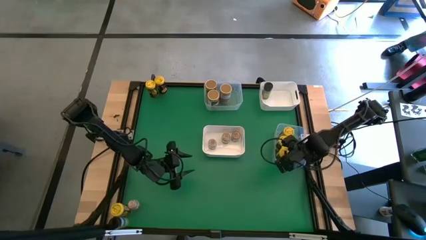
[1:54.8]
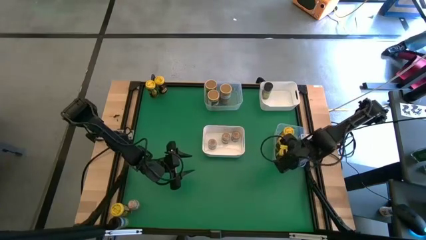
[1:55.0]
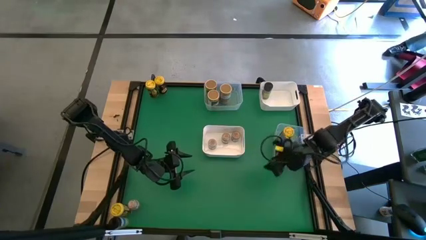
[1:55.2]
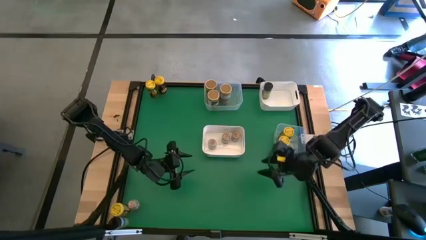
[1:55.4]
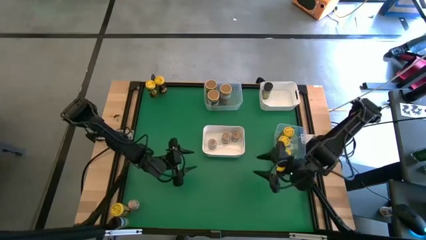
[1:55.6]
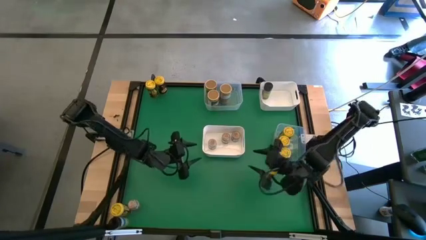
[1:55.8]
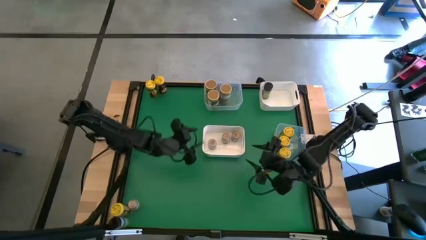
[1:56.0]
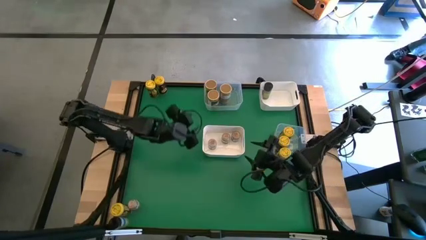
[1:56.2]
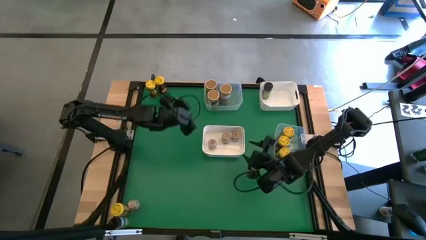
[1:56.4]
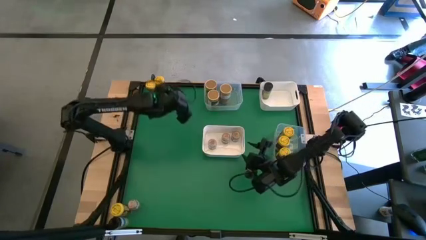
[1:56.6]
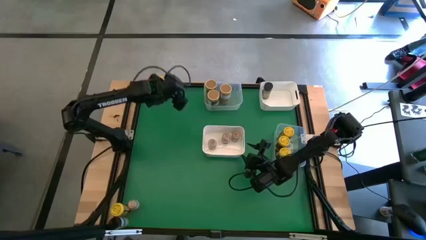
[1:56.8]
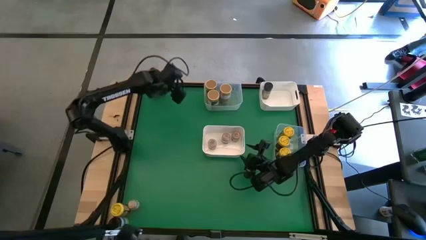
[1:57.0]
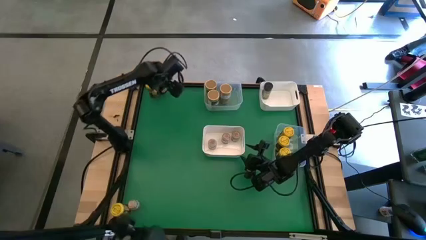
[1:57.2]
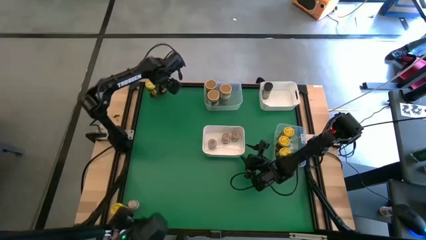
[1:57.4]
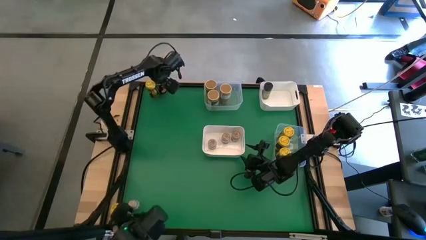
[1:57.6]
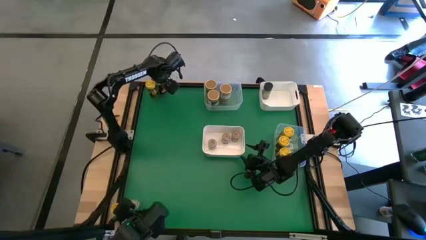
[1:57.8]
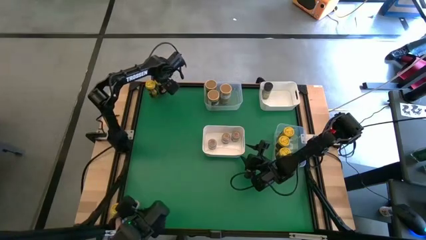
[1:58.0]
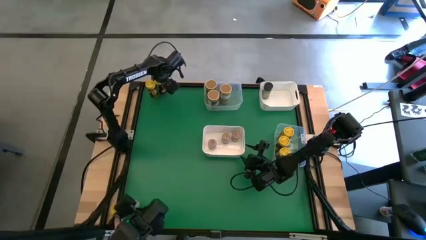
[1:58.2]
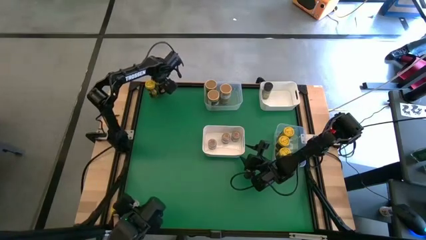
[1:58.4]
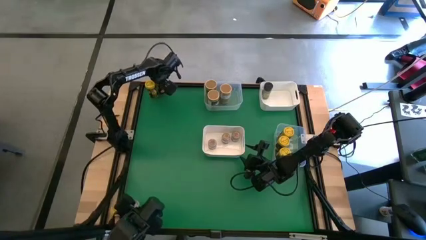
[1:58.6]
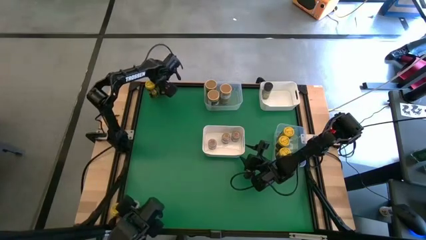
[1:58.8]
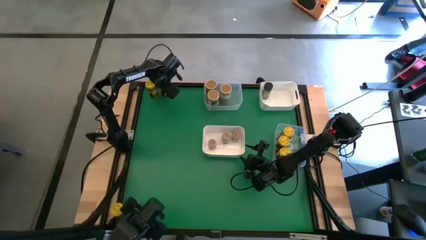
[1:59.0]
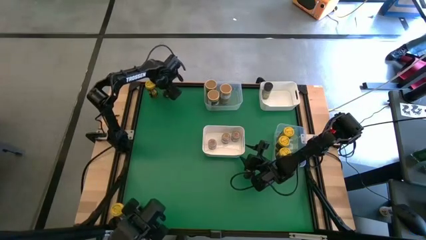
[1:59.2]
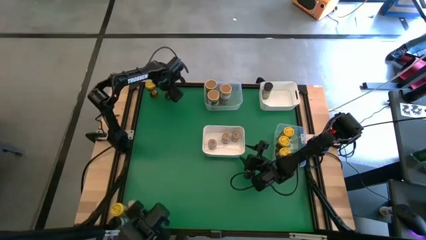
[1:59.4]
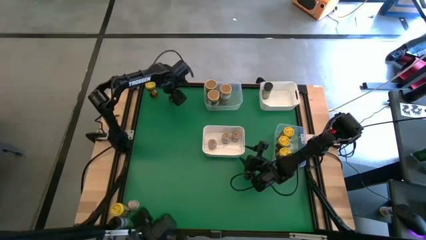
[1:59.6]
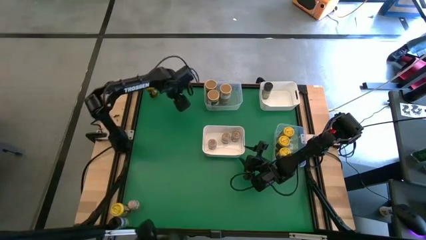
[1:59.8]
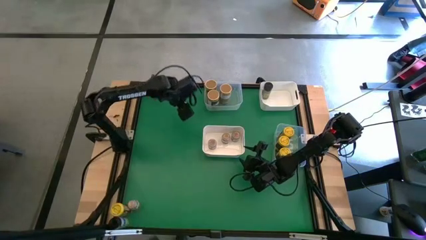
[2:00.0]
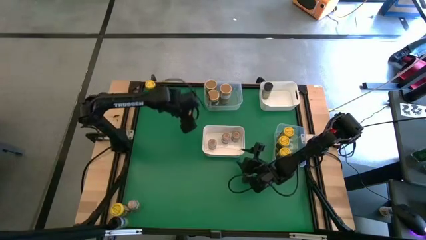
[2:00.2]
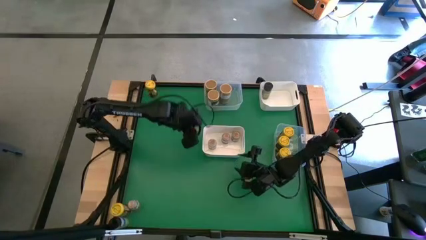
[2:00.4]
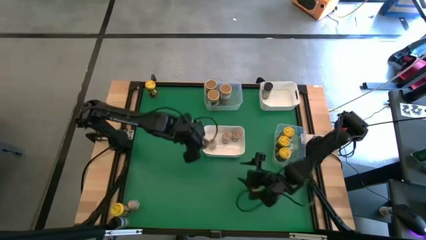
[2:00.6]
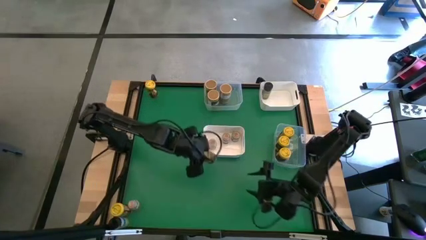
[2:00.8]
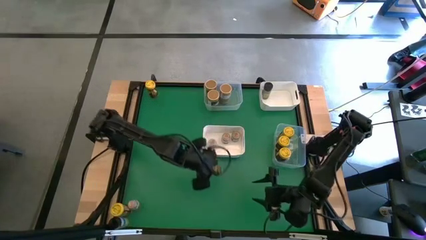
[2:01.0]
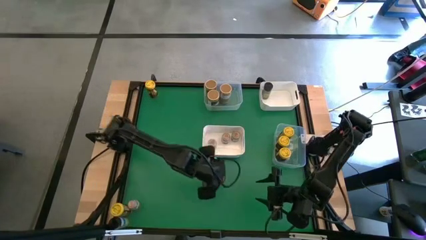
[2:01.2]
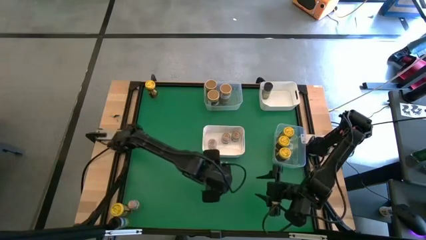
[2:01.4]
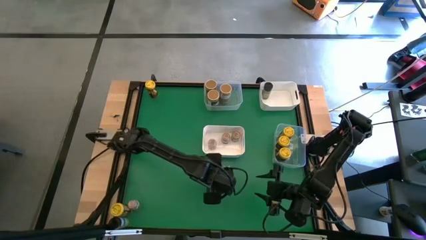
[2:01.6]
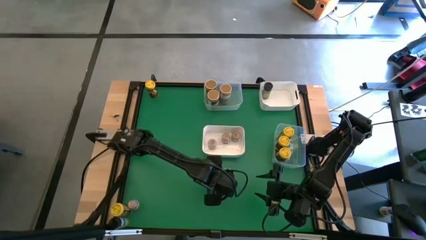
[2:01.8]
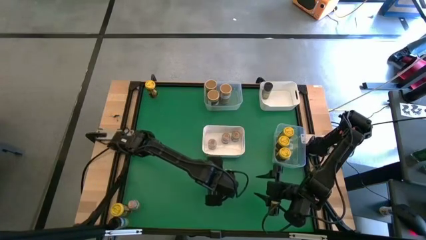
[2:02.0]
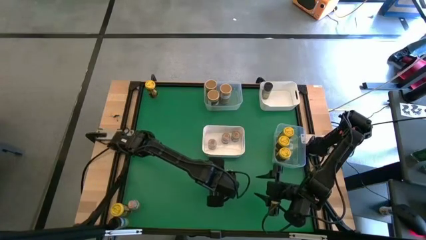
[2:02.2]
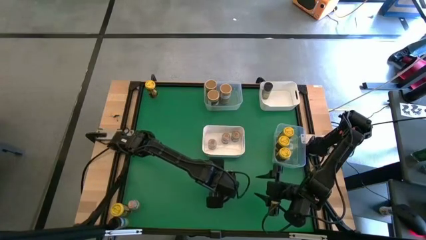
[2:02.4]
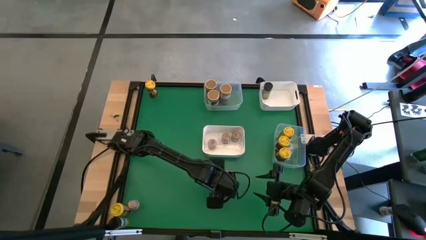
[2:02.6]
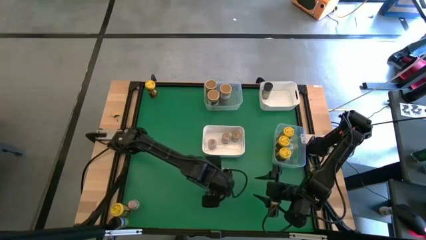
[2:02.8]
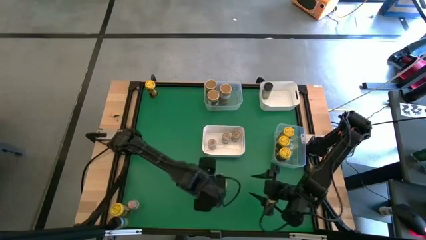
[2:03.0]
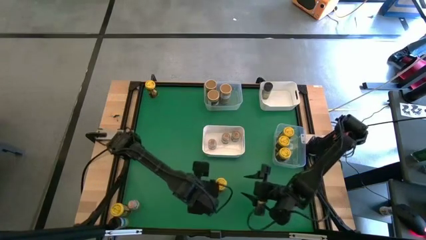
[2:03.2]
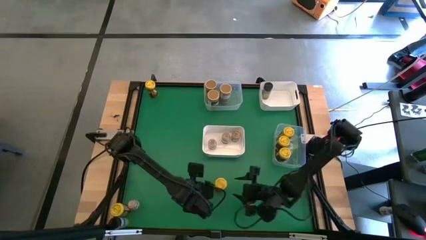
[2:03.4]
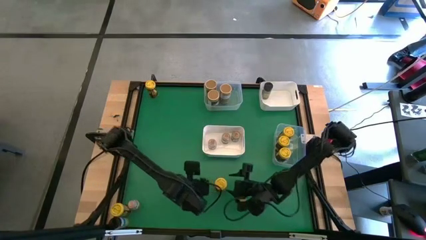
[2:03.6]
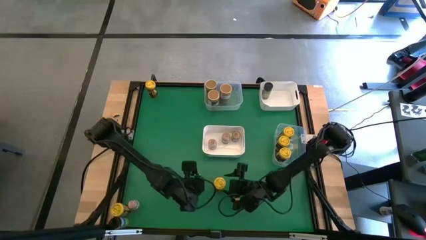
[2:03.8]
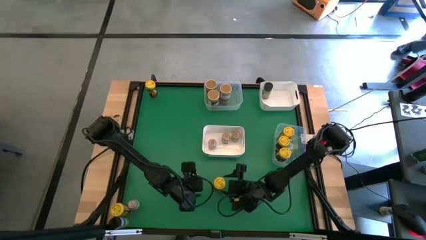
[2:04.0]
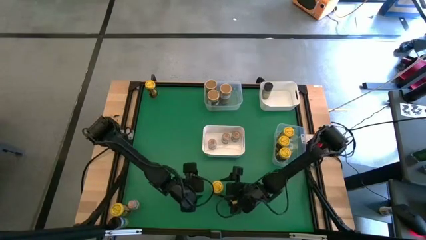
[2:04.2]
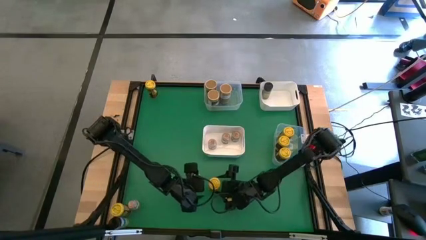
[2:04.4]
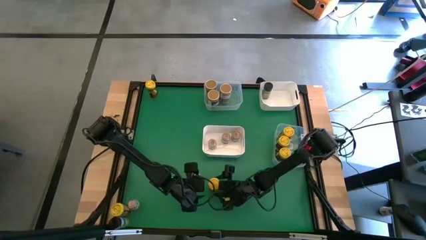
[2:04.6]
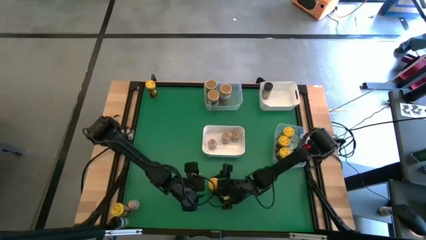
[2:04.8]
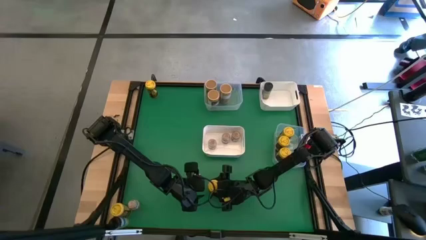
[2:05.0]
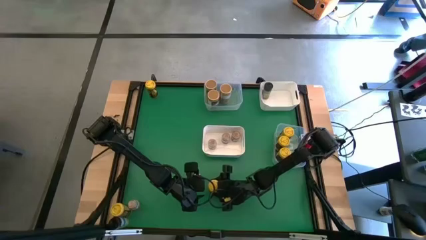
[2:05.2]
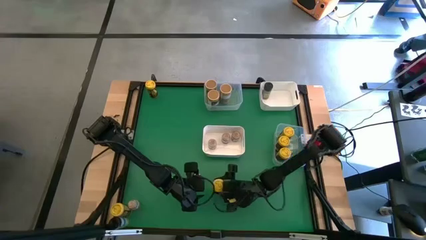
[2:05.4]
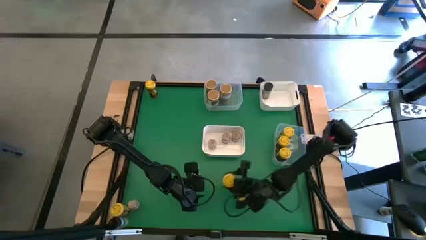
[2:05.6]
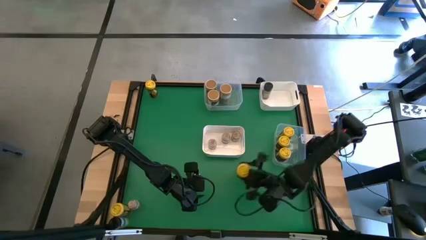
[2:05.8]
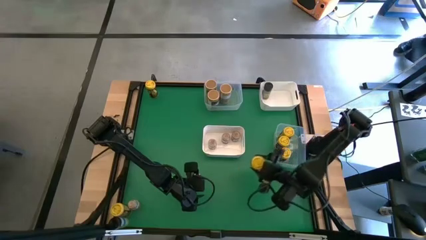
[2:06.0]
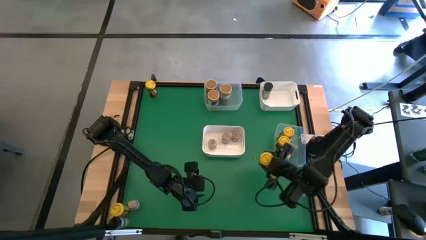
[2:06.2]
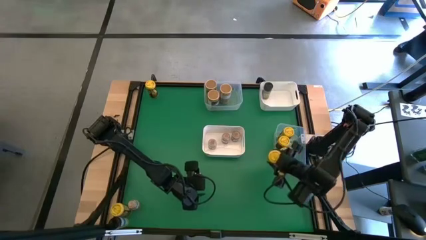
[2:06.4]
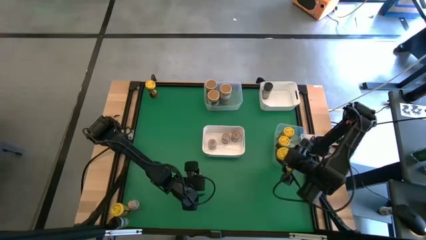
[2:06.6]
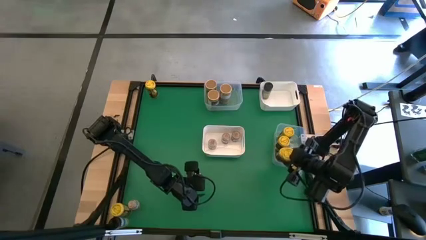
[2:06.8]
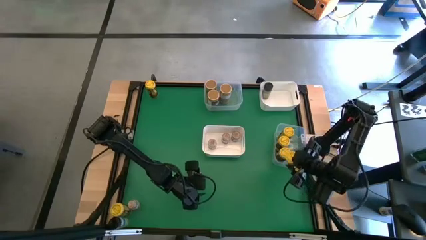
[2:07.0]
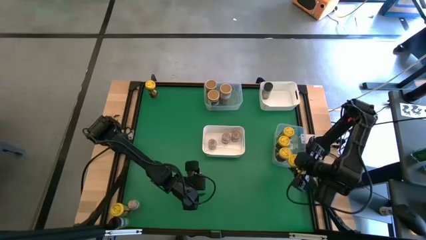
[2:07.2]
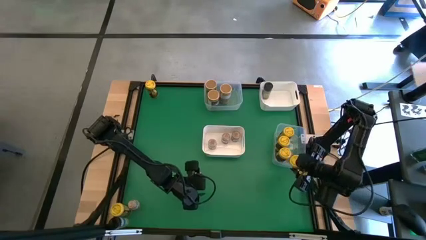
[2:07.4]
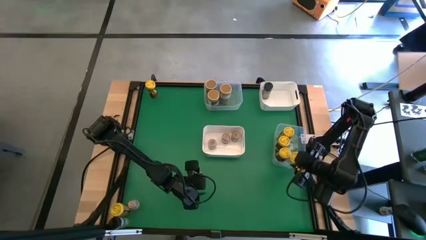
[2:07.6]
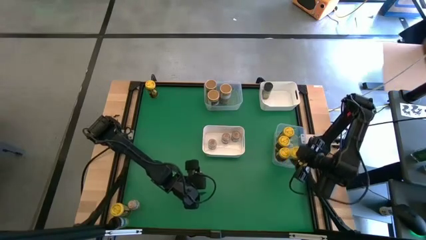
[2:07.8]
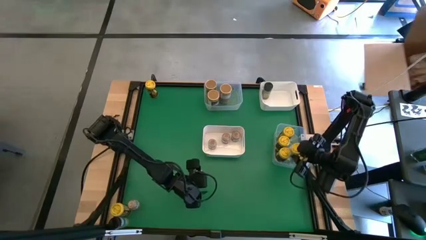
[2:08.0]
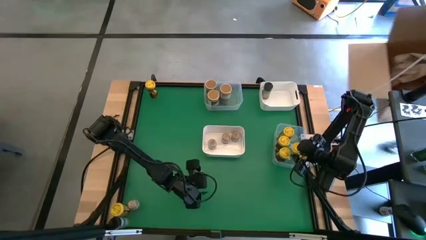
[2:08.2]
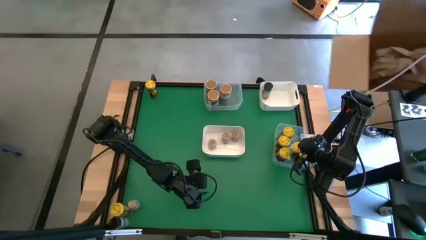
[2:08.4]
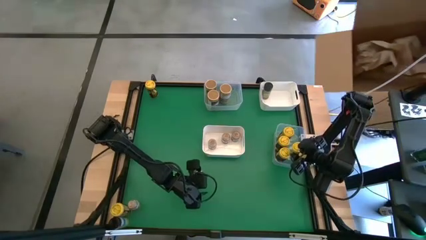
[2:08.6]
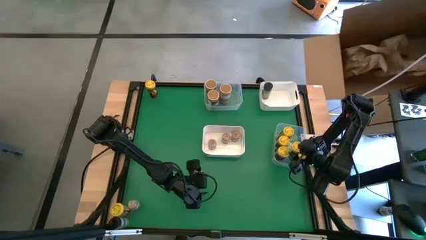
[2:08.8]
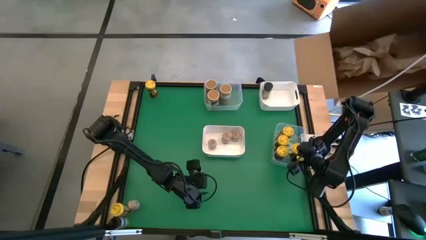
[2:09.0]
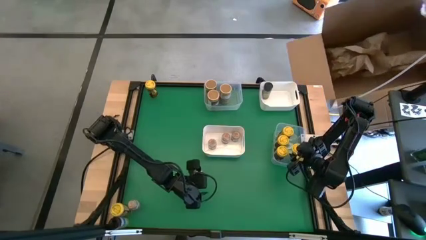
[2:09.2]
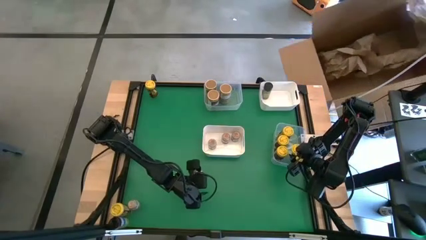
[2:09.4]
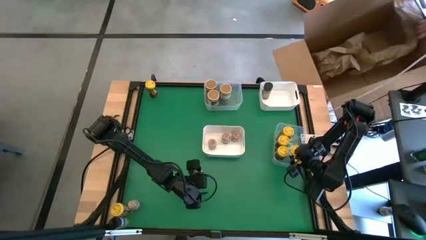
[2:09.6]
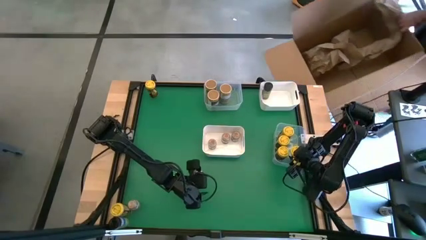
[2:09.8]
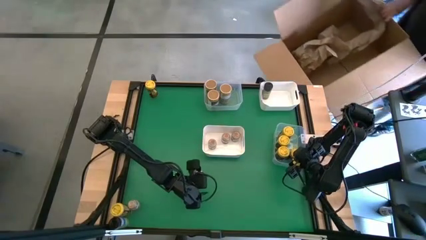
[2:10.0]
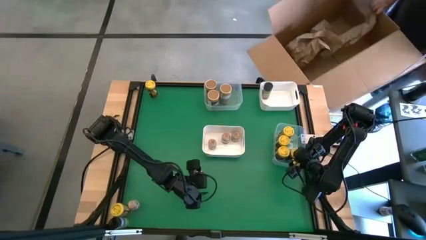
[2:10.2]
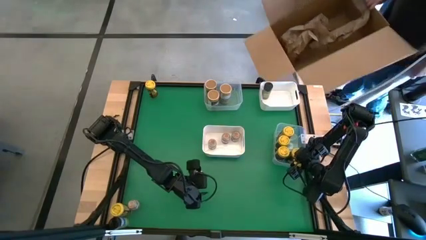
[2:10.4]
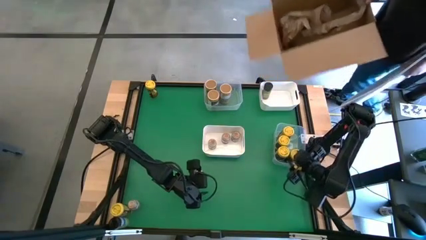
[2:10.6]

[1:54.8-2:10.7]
Task: Sort spices by type
Put the yellow seasoning can into the bottom transparent bin
